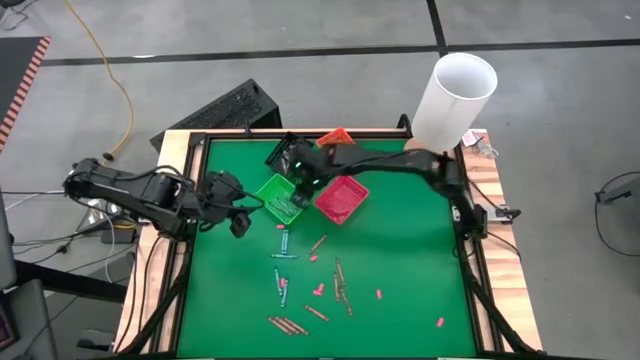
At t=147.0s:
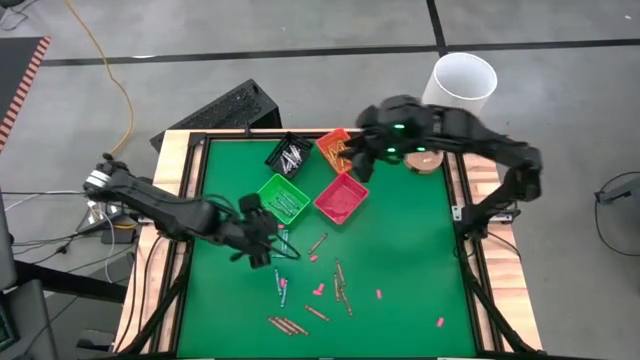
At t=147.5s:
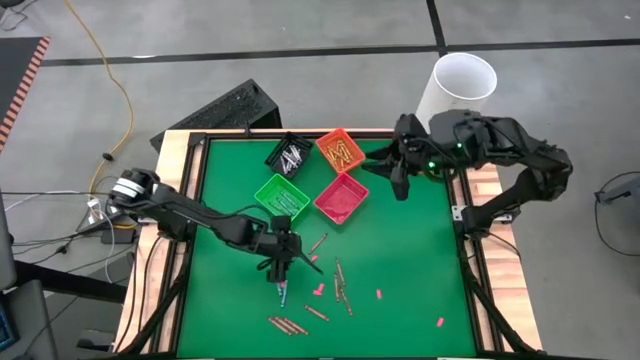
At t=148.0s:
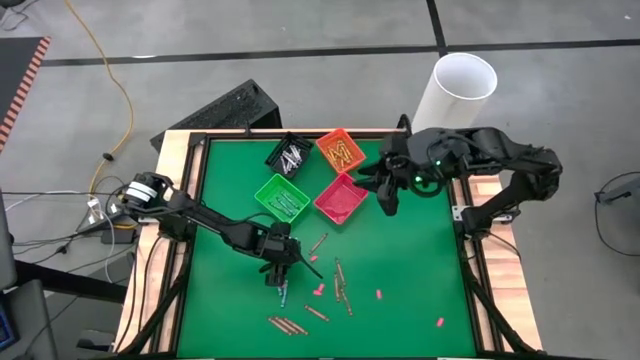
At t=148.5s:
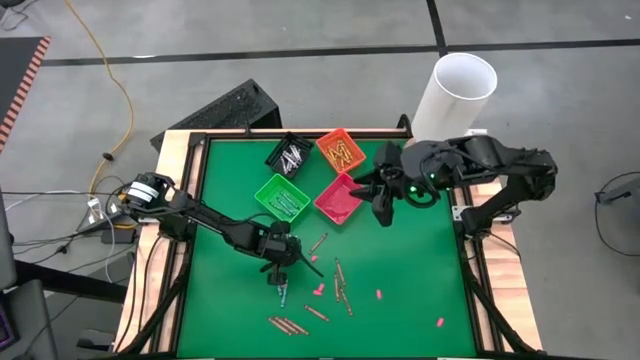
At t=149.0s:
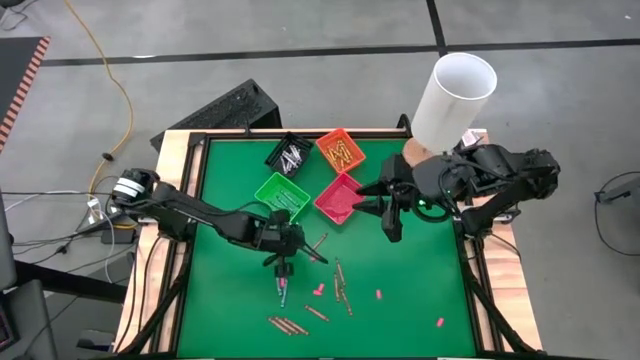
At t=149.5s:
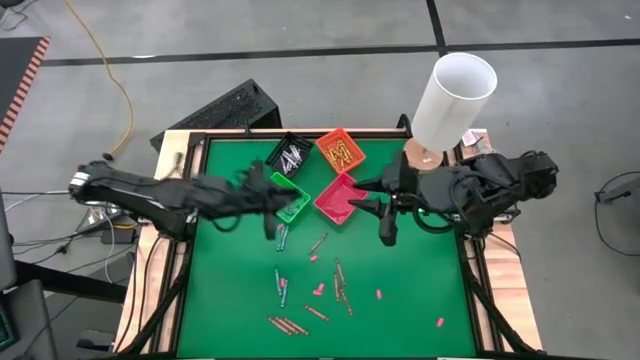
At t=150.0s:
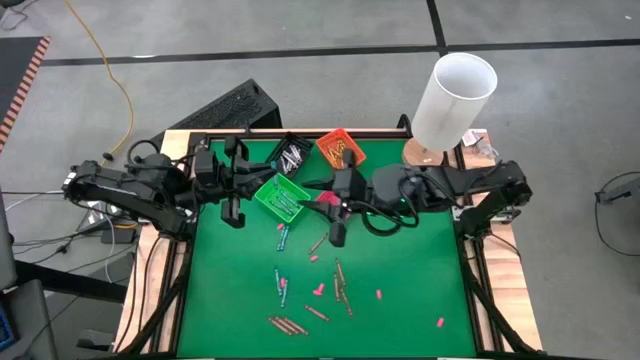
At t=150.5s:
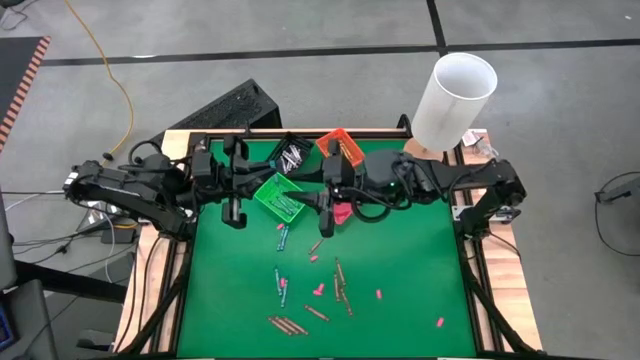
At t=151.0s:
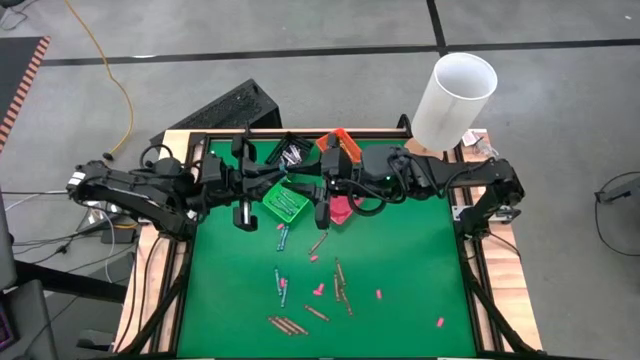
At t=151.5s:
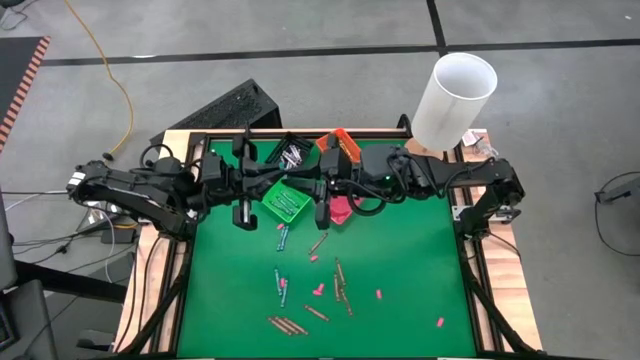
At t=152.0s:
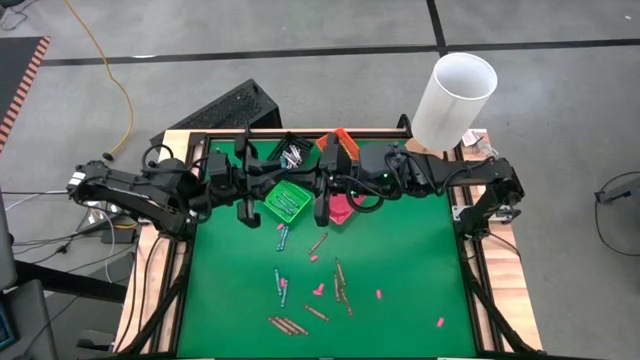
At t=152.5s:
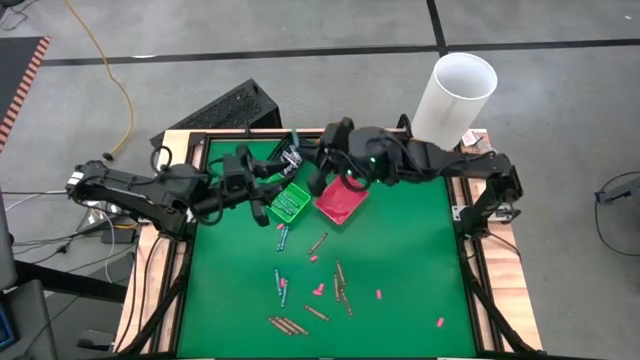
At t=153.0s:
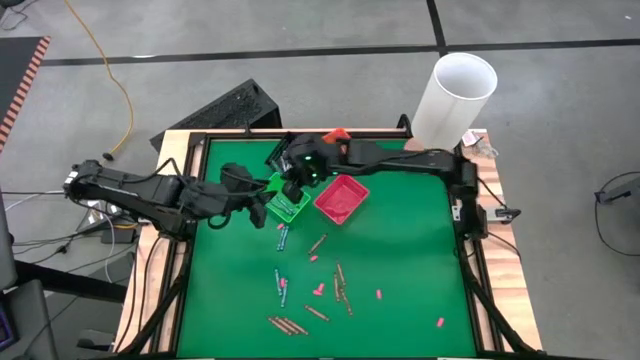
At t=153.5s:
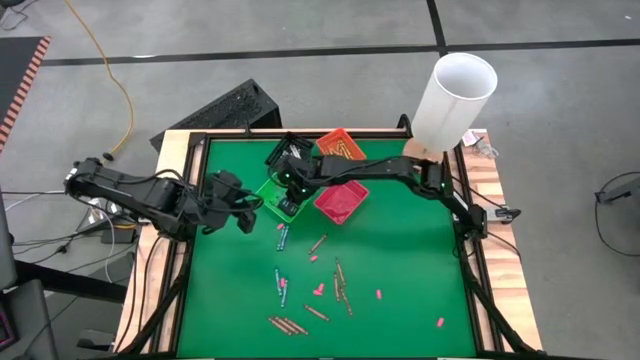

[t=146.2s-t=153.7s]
Task: Sort crayons
Put the blue crayon into the bin

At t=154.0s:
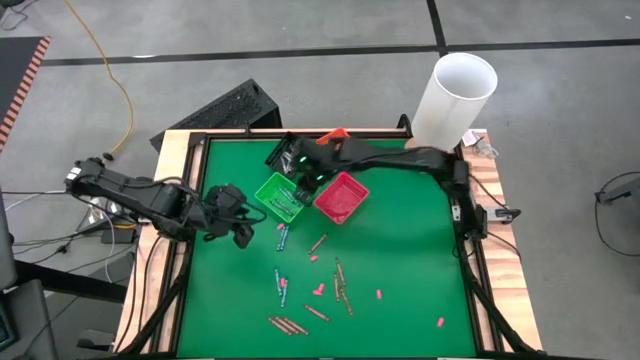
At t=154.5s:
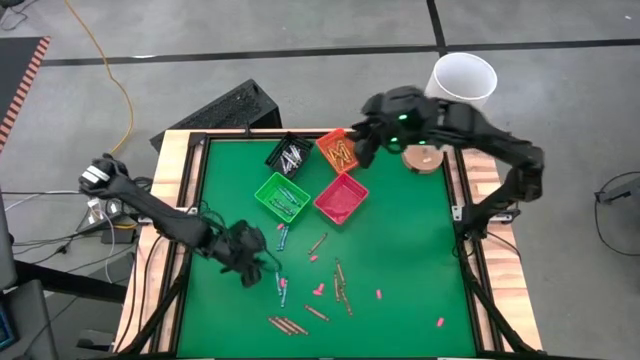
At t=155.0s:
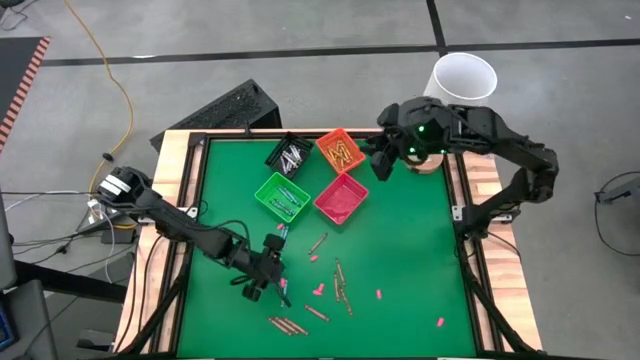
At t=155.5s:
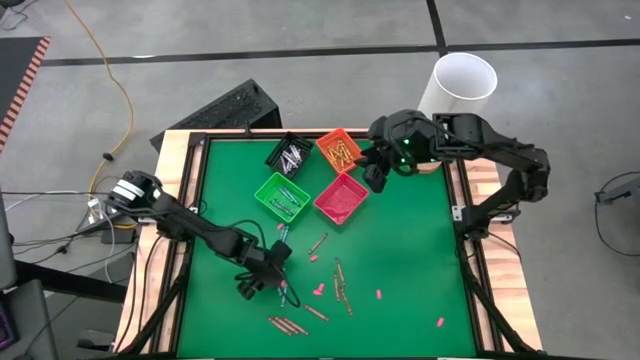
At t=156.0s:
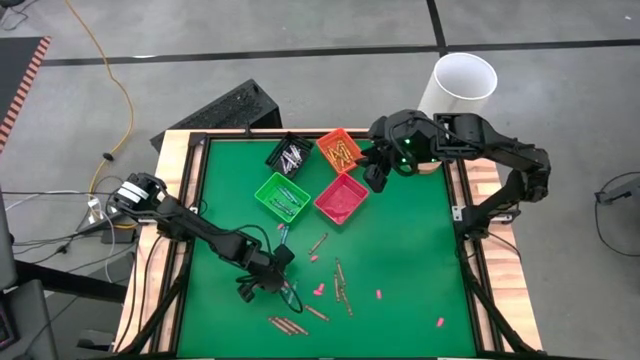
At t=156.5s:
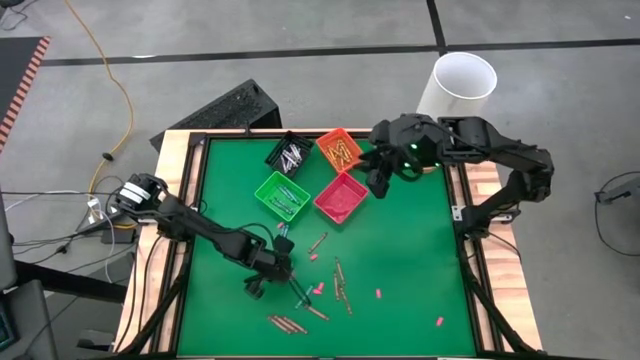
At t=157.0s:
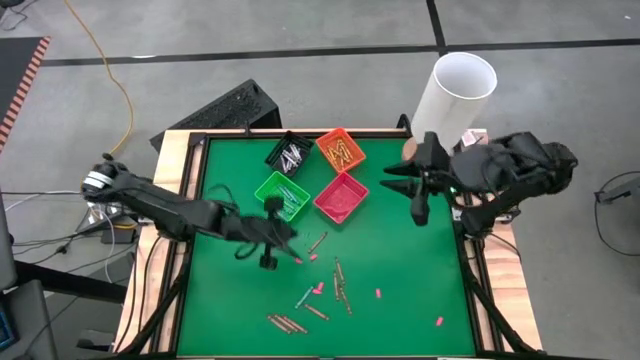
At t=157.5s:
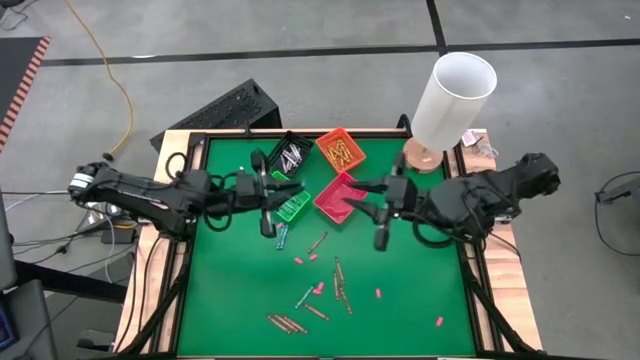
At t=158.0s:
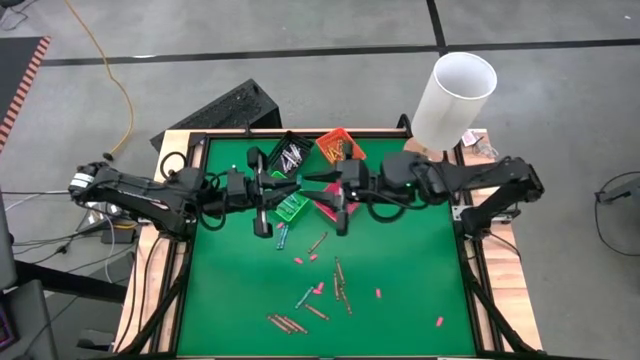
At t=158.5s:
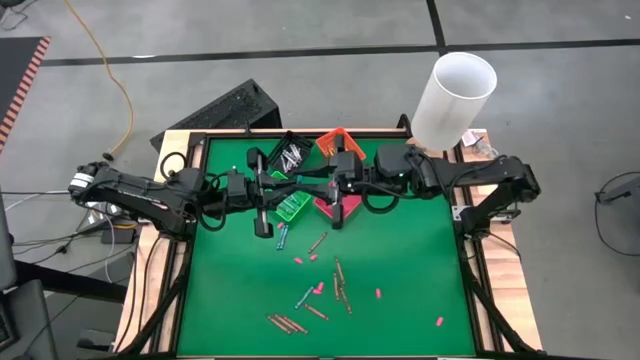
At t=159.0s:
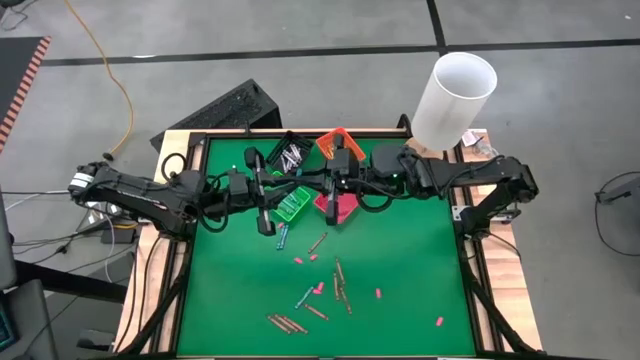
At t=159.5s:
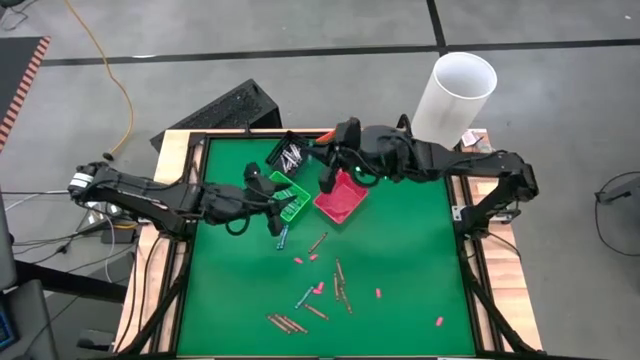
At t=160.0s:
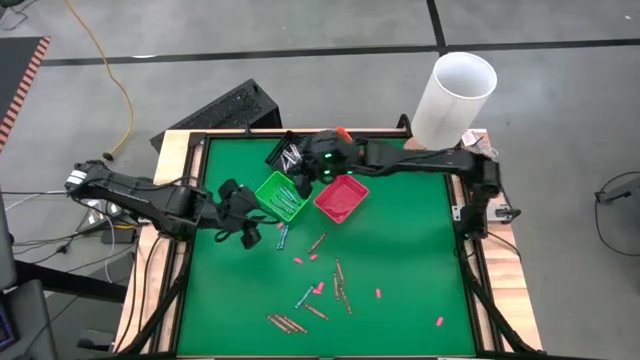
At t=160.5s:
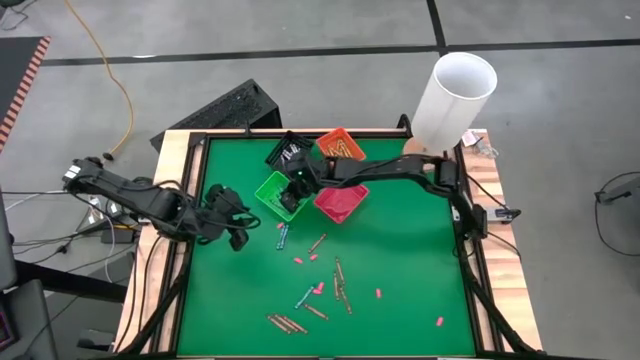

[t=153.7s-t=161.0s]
Put the blue crayon into the bin

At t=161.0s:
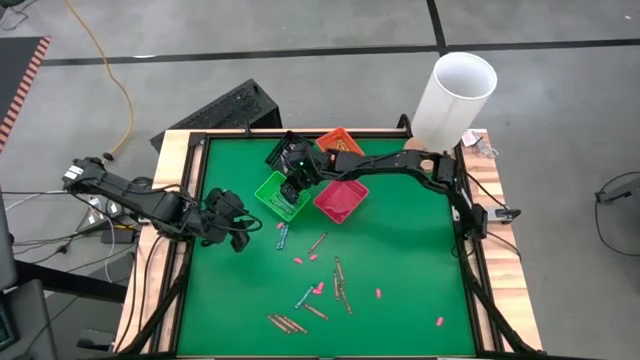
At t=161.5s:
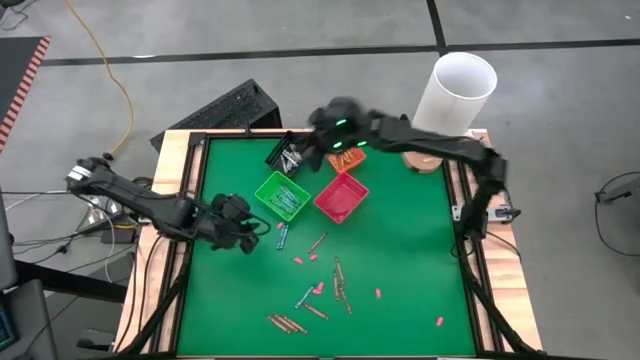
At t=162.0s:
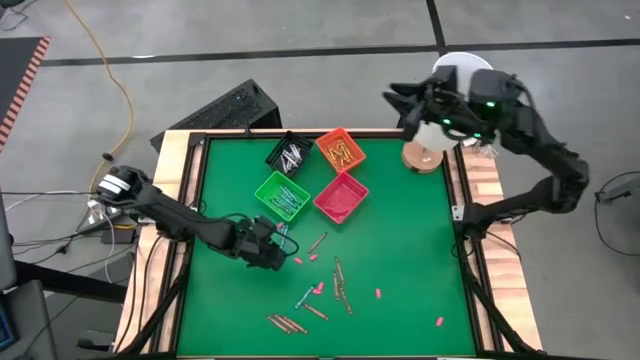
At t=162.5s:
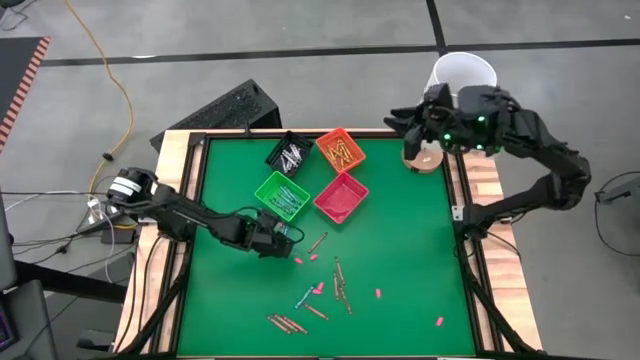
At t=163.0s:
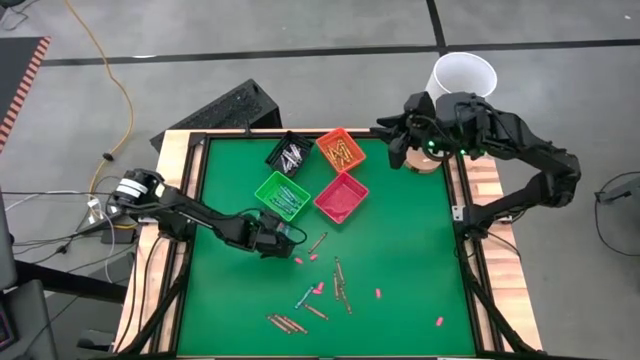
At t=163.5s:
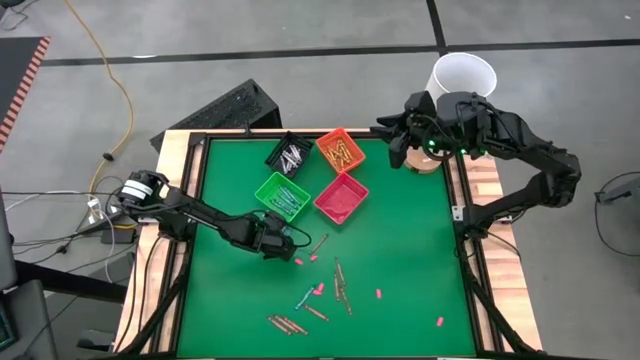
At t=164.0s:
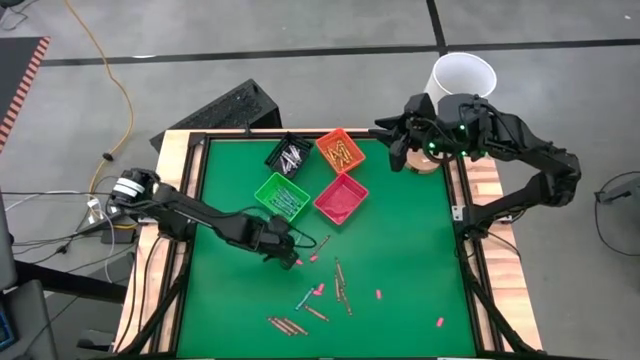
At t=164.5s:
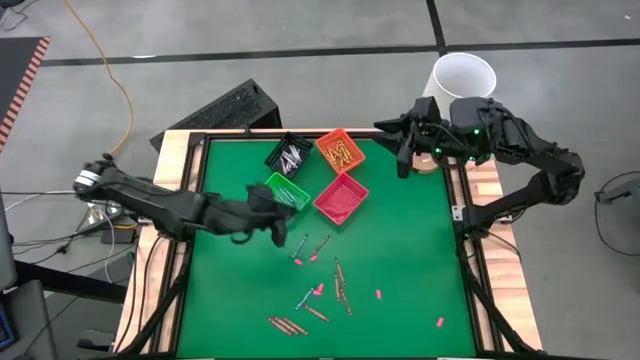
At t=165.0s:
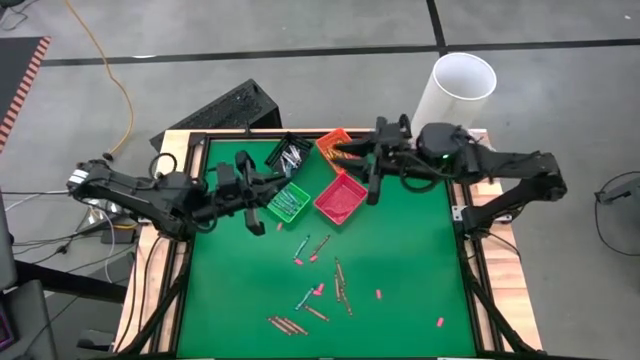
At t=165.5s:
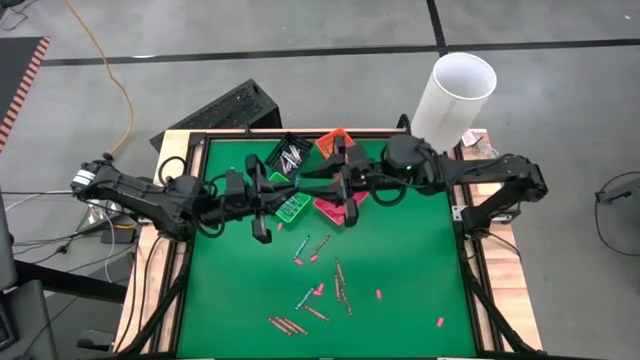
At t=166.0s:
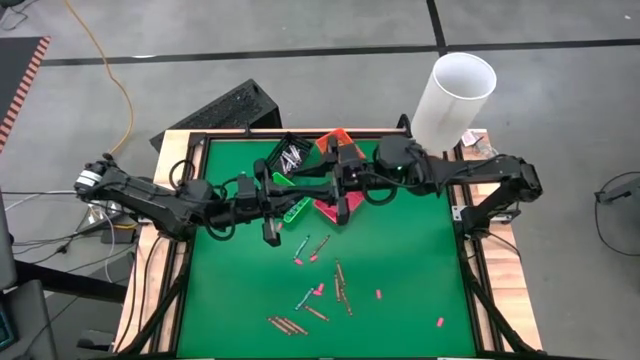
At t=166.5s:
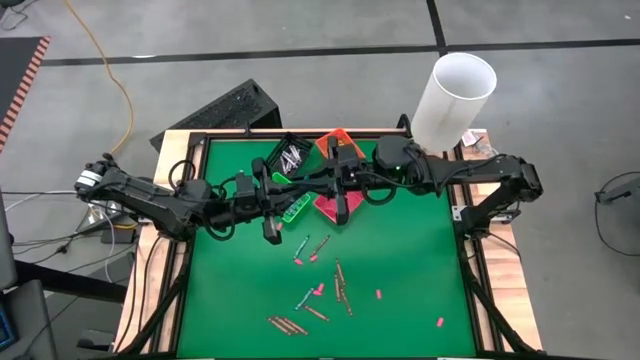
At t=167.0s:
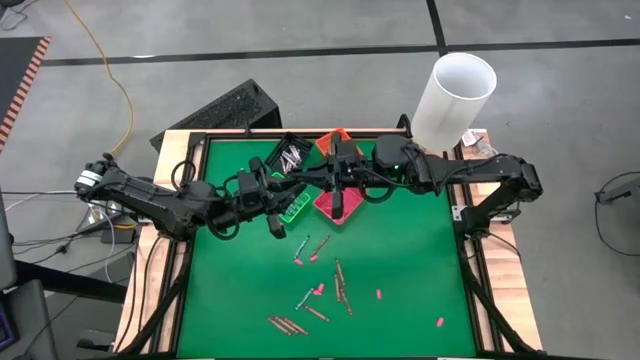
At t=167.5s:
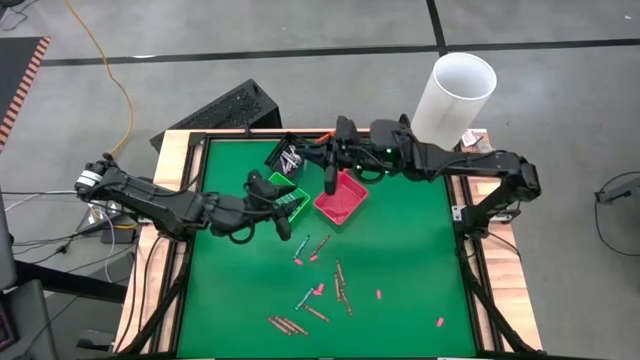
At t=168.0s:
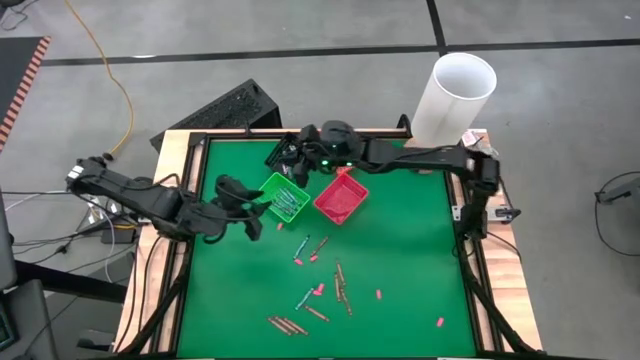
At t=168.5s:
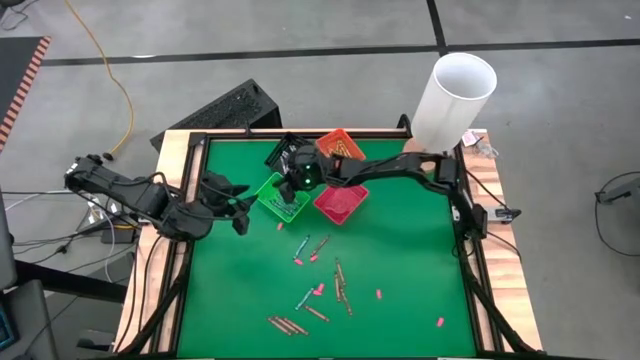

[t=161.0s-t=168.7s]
Put the blue crayon into the bin
